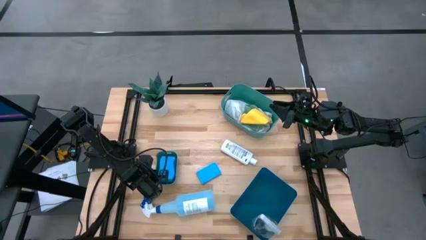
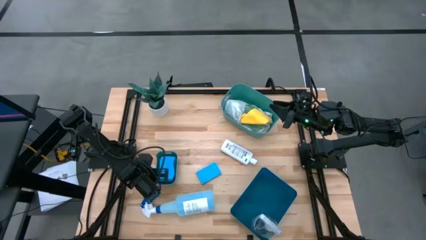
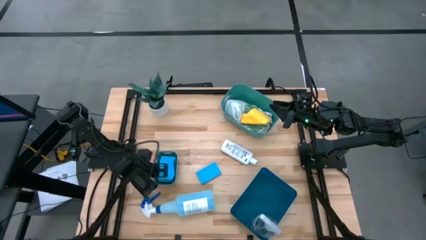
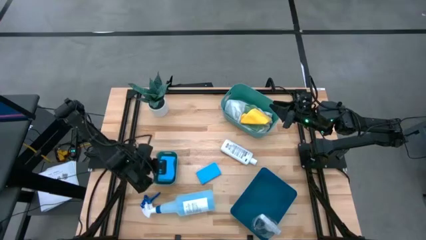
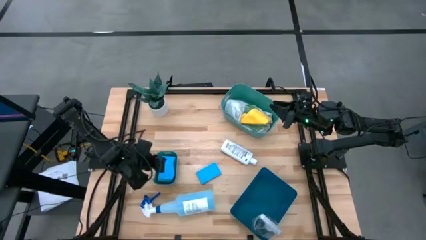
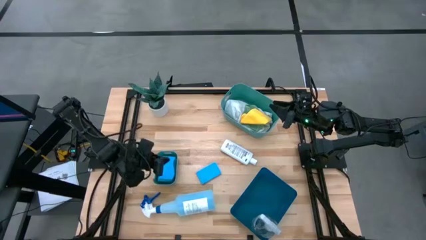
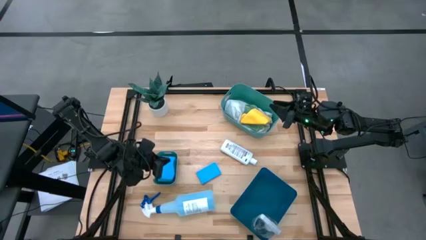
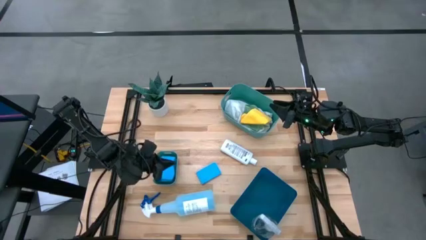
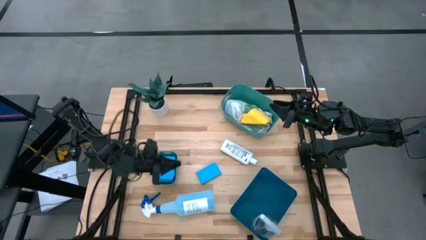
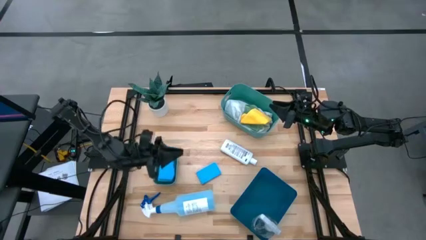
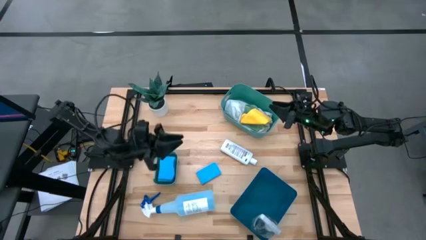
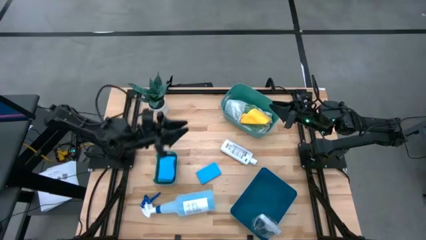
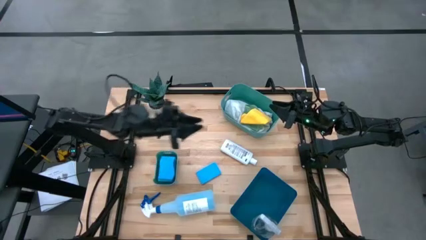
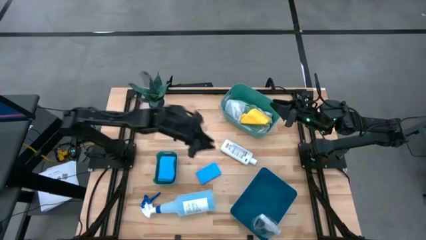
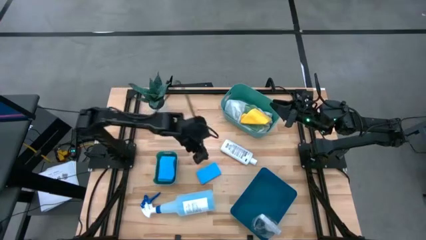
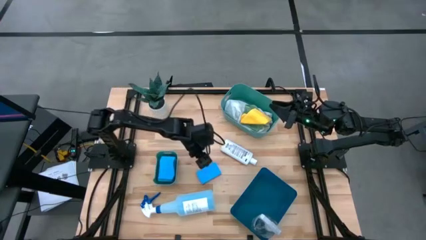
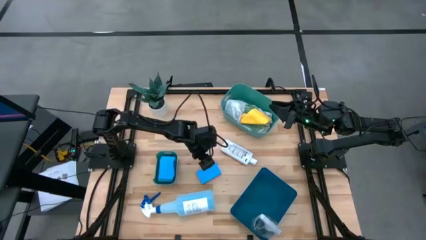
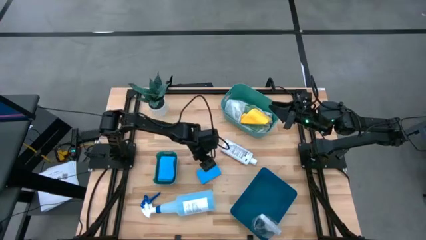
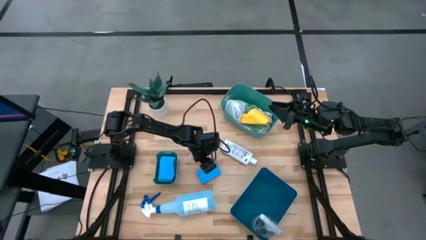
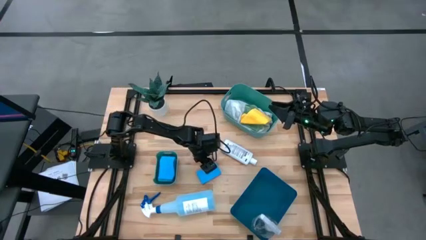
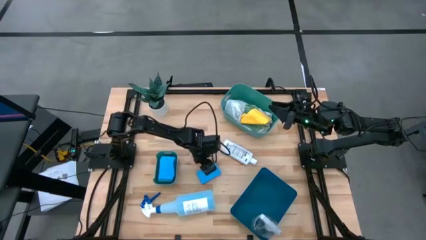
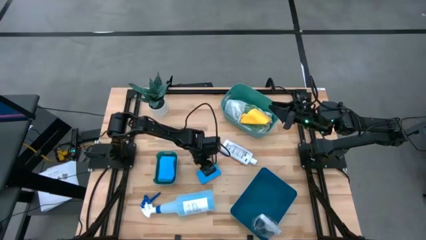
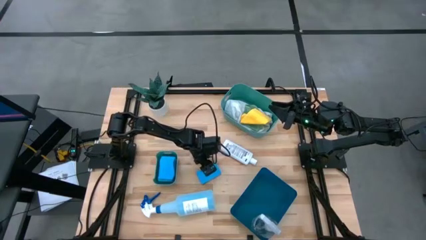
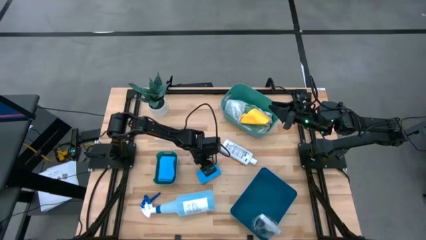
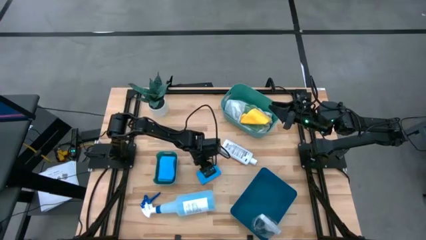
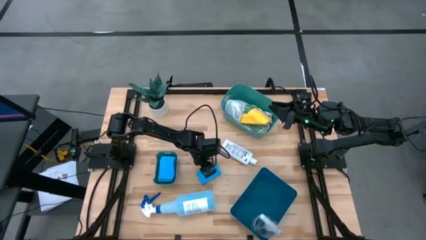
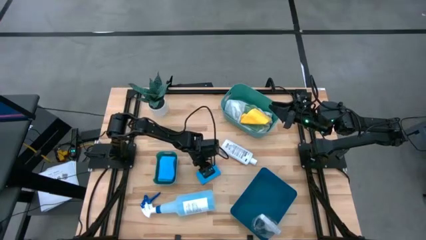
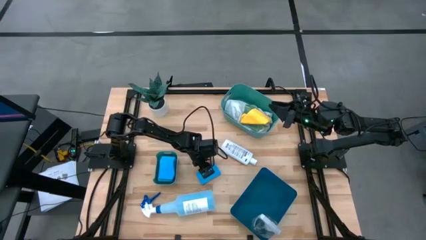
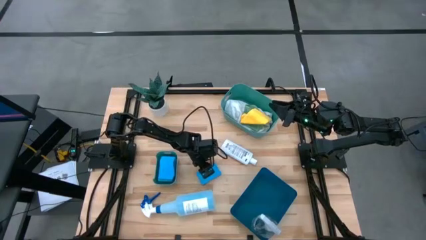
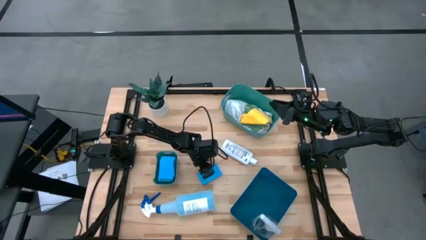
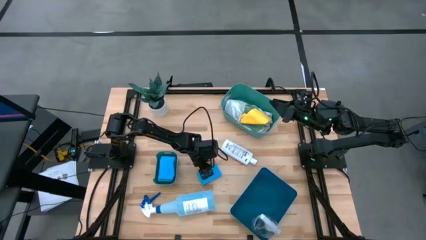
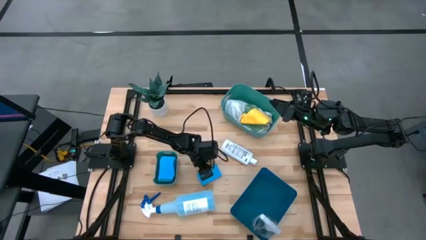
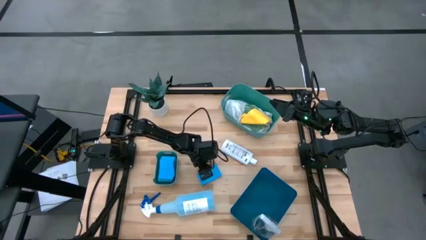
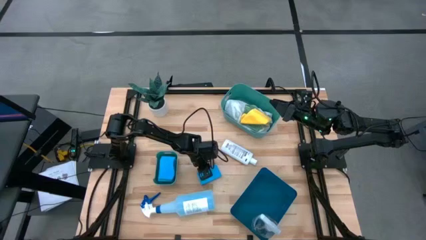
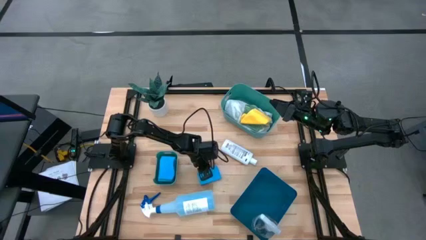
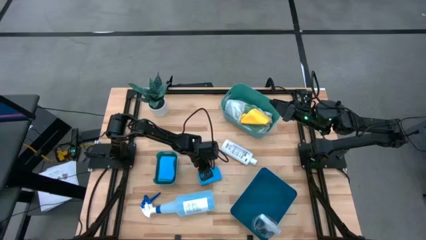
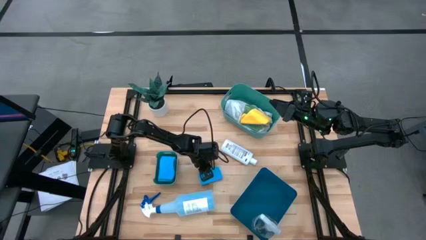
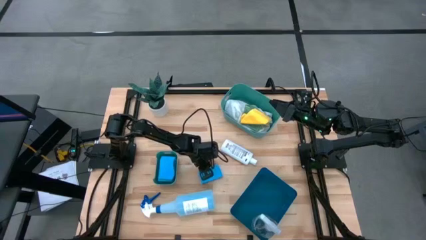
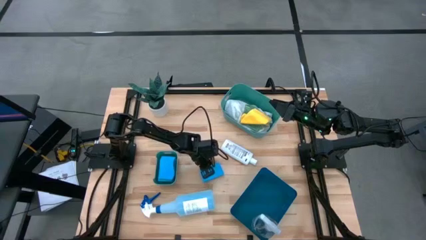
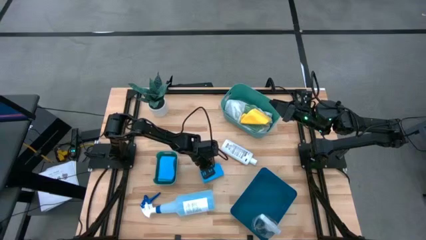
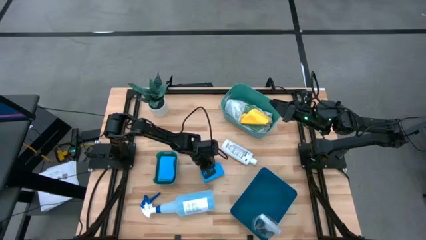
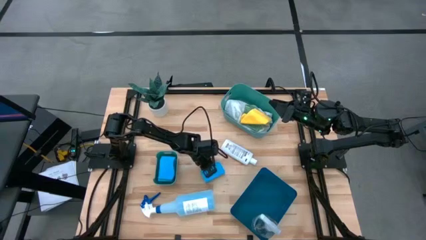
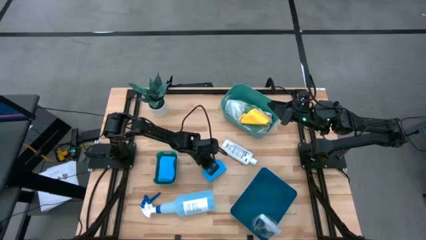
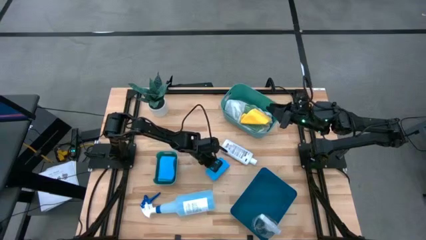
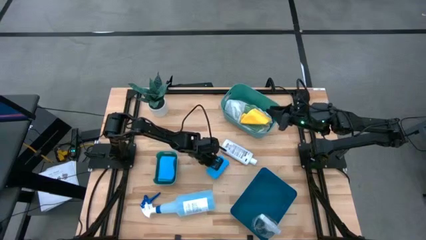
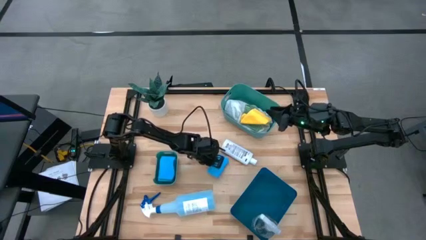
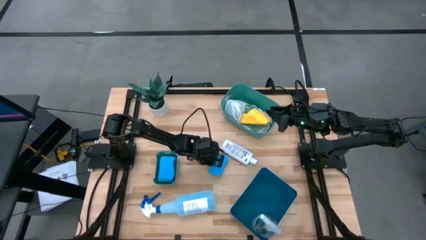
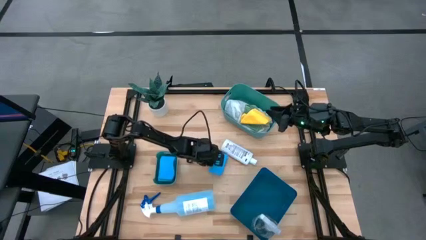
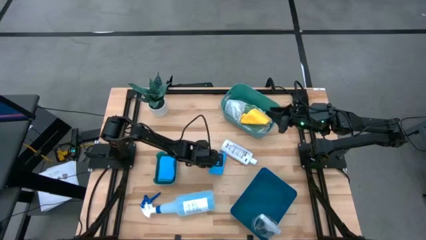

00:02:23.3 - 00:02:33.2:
Task: Pick & Place Kitchen Items
Put the blue sponge into the small green bin
